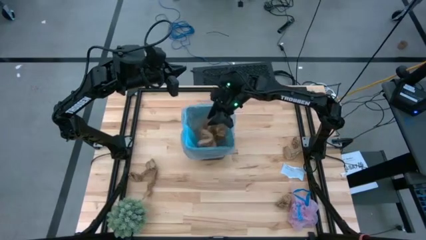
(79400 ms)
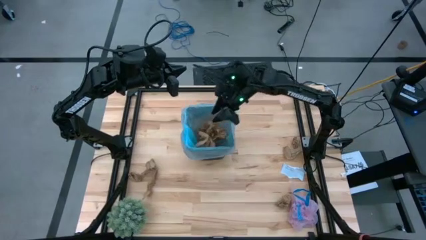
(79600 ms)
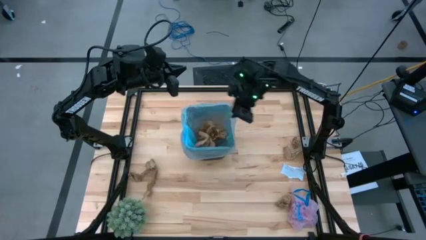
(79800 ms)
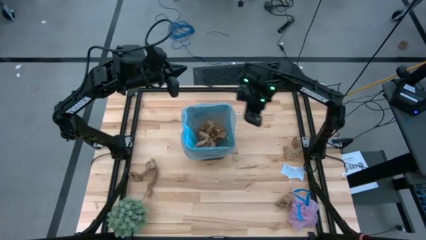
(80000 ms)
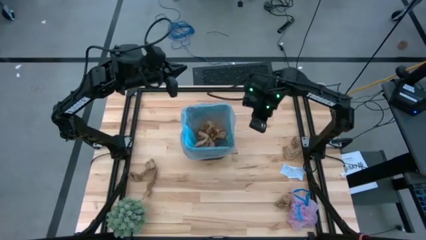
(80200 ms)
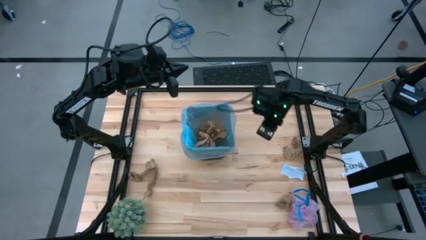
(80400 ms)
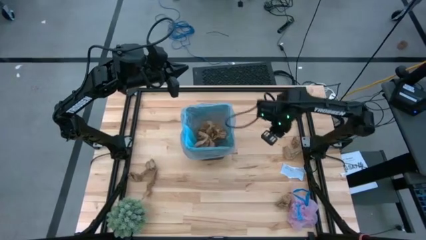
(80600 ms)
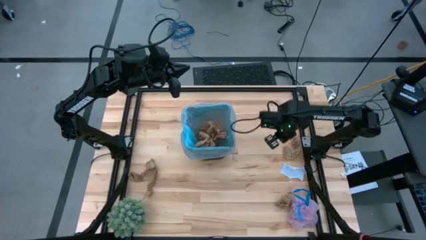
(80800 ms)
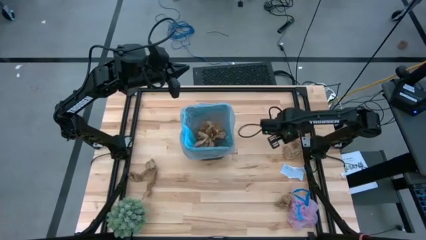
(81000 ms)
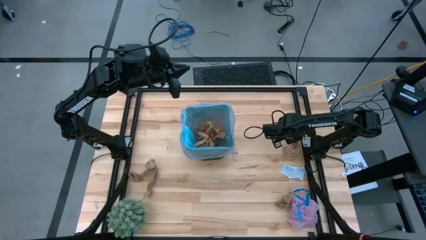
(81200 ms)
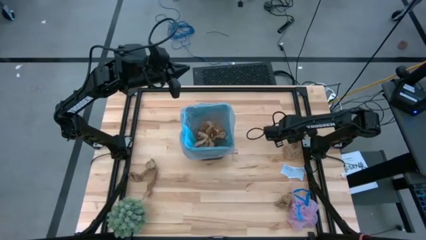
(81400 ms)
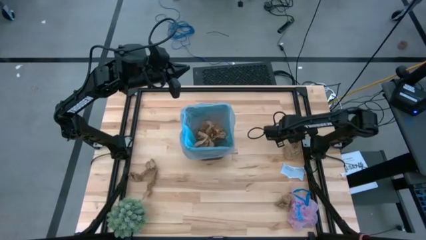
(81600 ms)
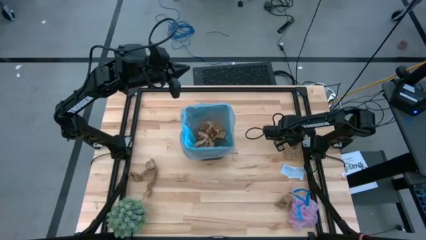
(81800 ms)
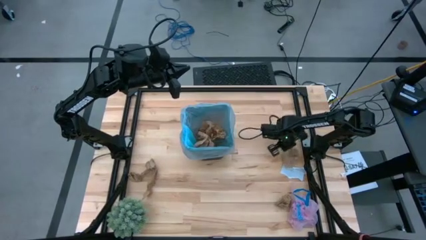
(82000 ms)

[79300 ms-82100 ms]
Task: Pick and place trash into bin
Put the brown paper into the brown trash bin

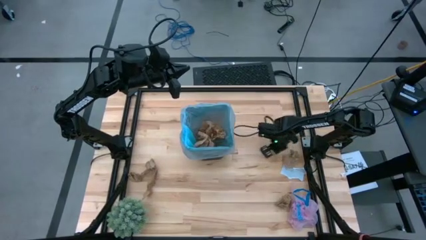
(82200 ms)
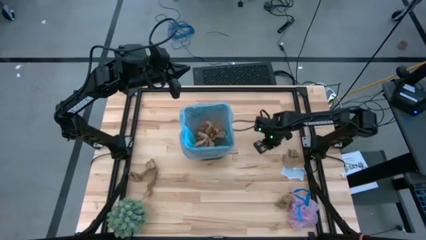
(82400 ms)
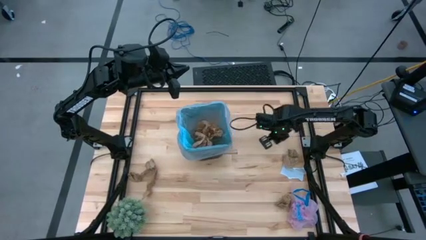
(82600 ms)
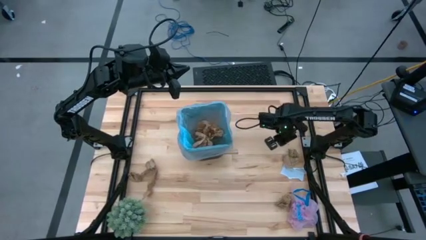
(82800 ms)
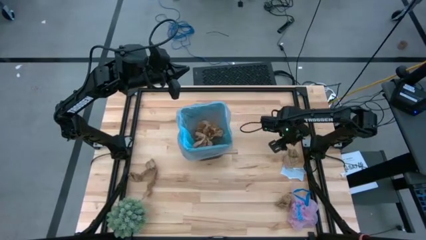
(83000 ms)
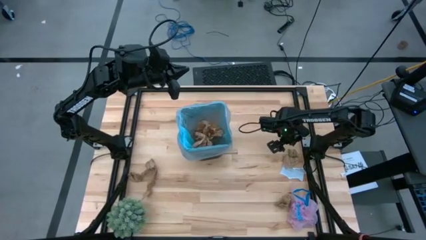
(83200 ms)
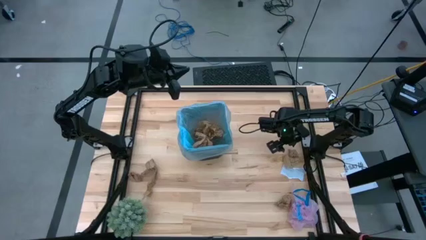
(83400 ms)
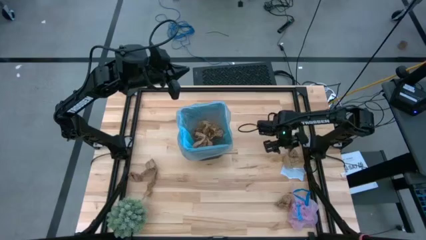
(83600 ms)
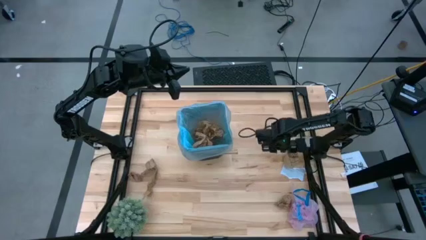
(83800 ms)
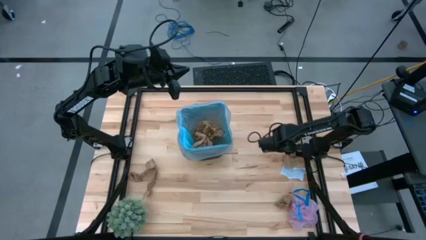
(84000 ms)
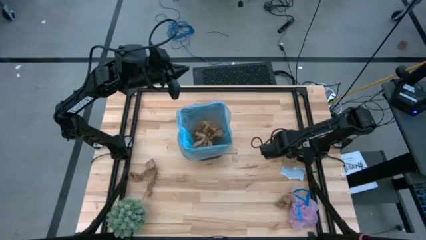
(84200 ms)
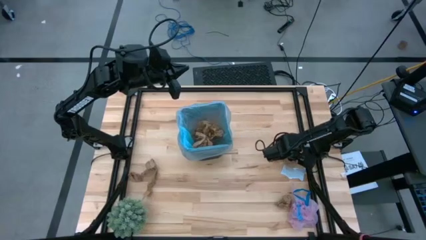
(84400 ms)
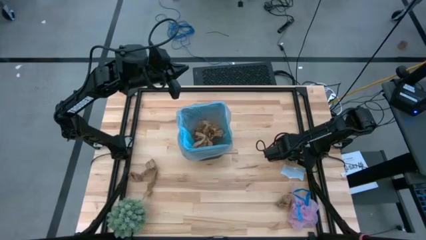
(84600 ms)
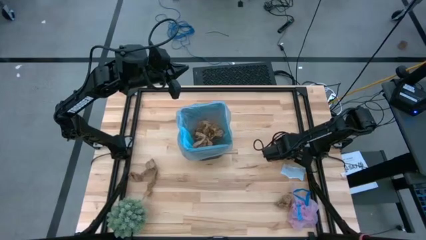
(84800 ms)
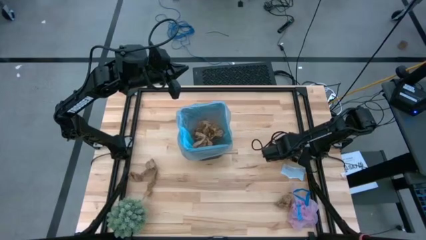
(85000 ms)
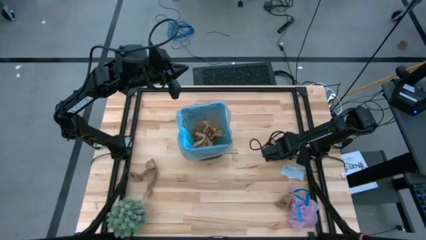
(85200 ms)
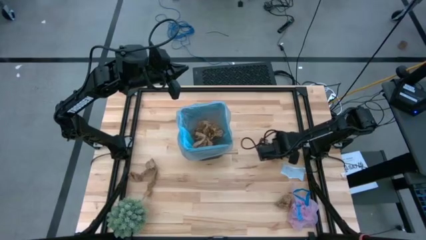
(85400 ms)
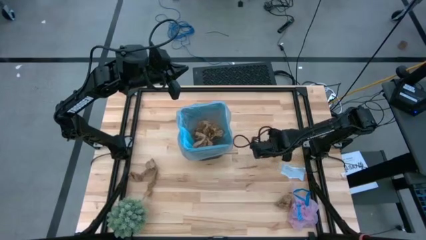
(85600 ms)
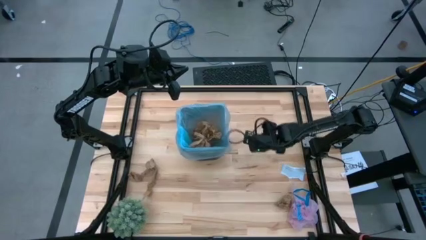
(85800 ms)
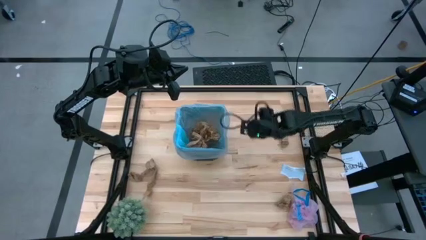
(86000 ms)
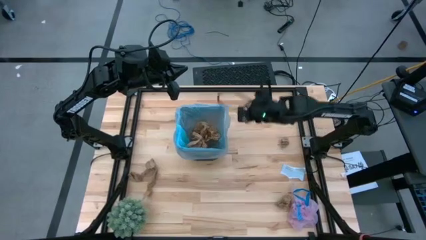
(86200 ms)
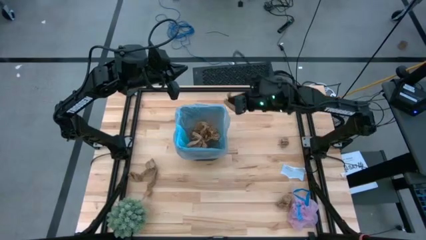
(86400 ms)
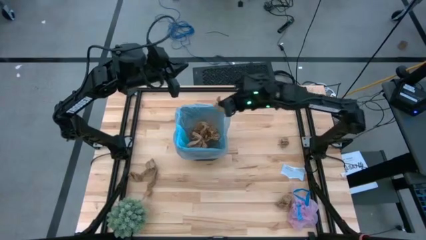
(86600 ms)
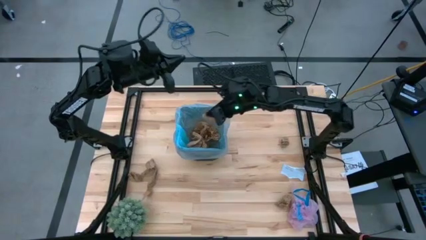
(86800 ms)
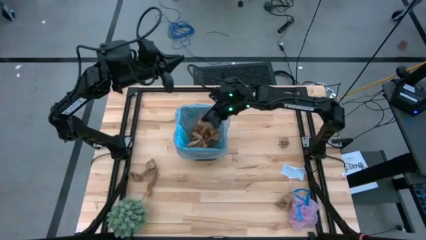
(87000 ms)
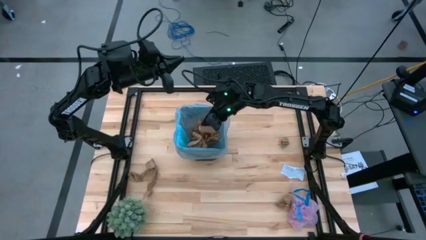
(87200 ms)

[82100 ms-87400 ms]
Put the brown paper into the brown trash bin

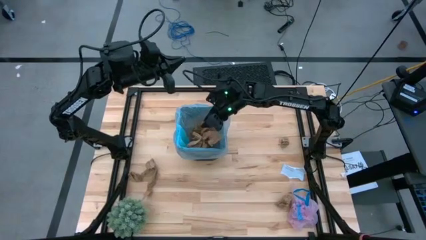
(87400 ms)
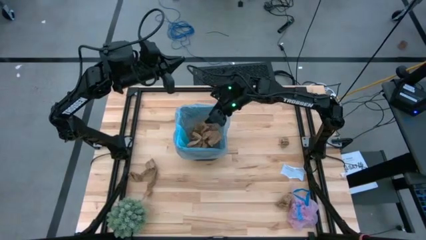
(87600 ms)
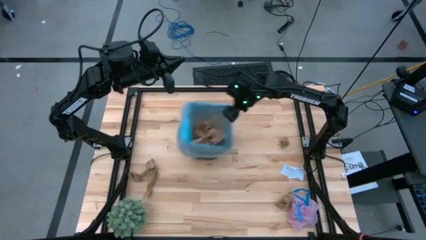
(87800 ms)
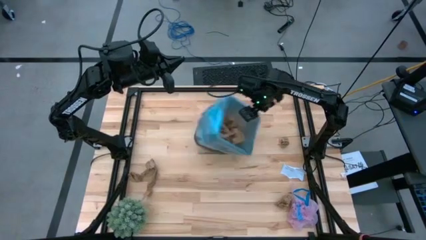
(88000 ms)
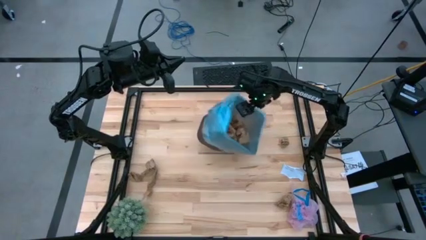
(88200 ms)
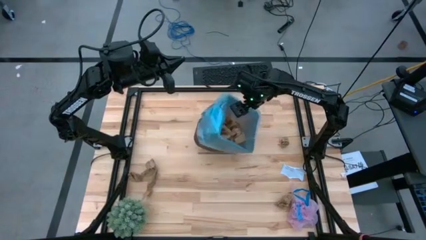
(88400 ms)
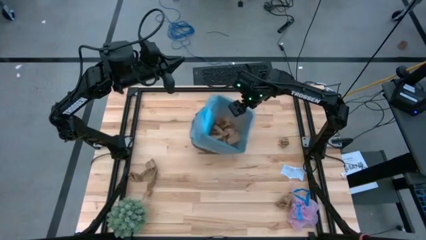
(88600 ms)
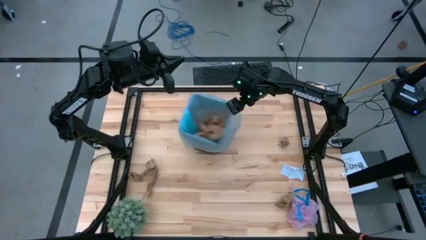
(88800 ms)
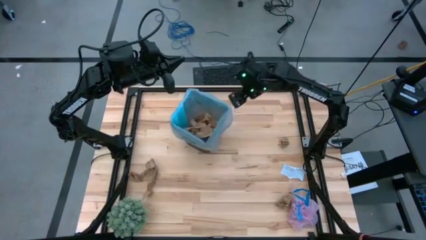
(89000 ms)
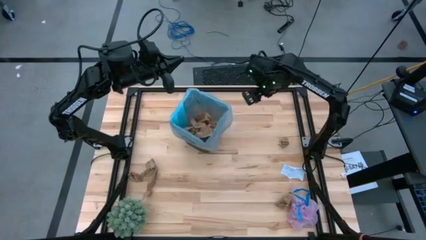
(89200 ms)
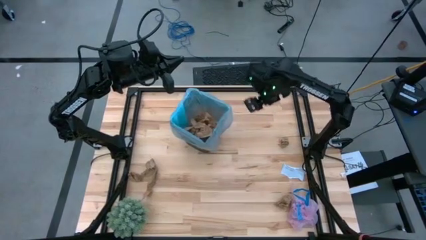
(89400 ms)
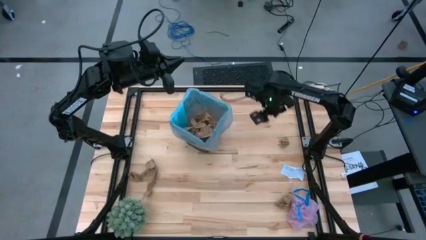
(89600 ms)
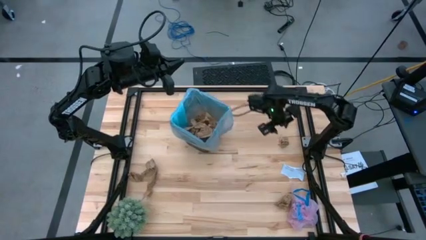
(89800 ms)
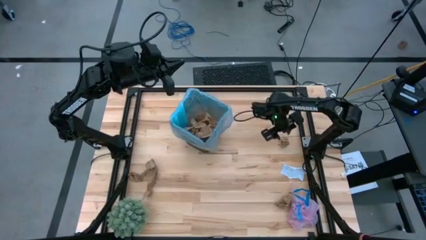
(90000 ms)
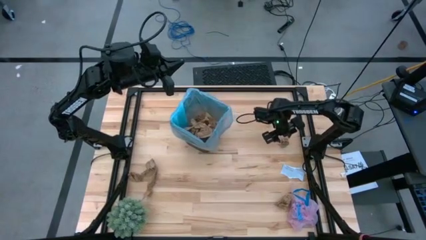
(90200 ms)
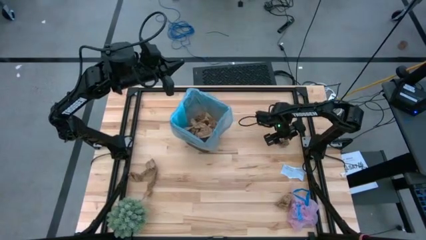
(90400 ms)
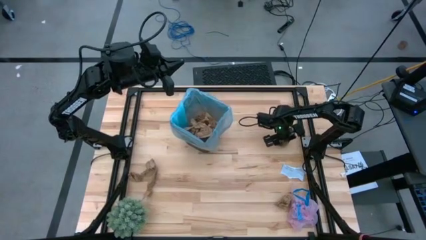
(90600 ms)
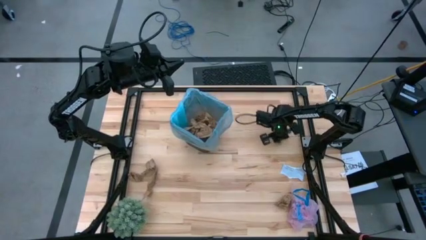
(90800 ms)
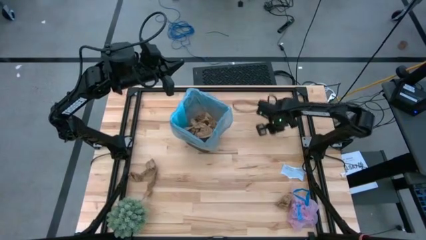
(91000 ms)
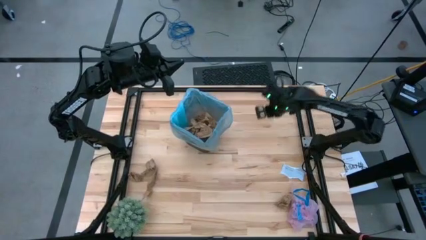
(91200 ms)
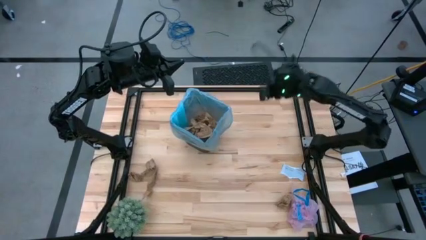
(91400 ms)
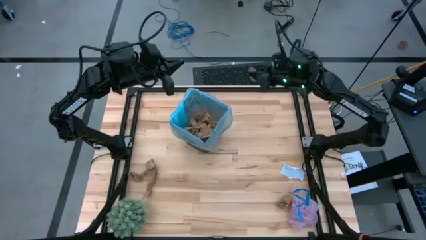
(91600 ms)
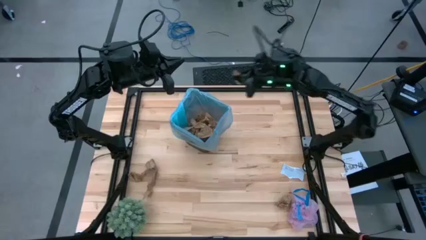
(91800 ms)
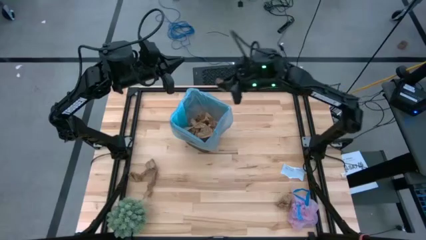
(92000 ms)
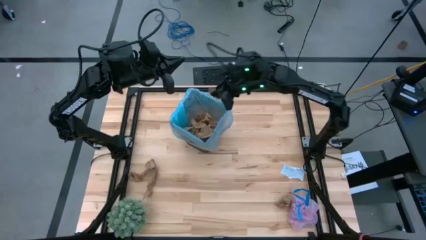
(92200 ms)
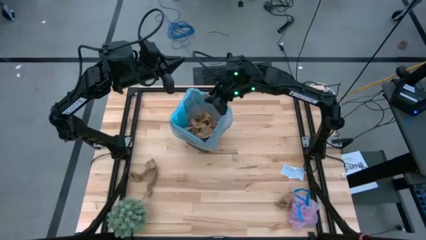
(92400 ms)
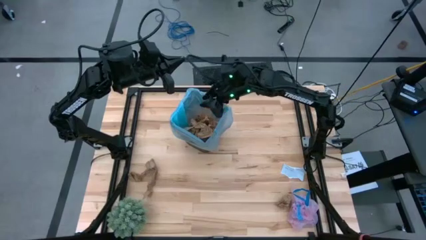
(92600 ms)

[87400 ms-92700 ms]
Put the brown paper into the brown trash bin

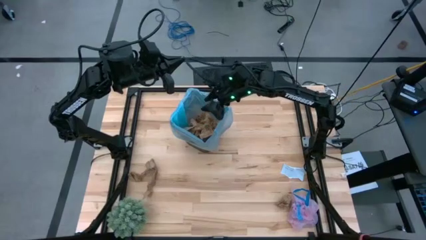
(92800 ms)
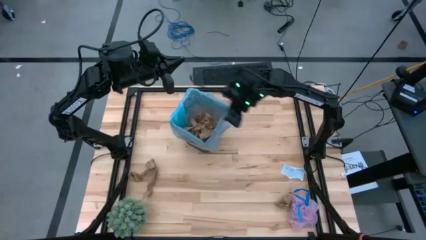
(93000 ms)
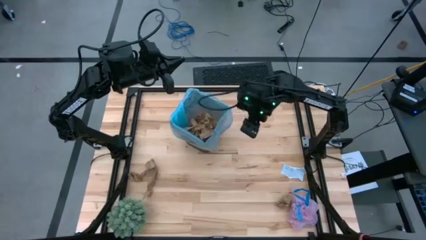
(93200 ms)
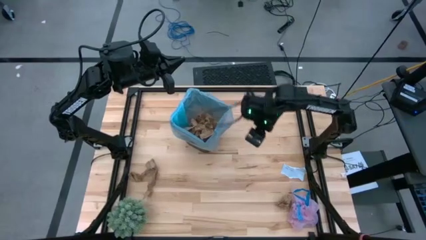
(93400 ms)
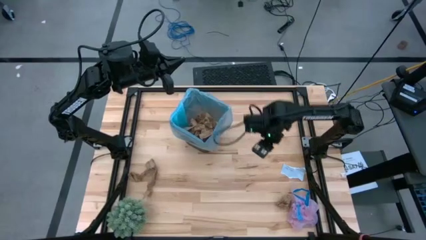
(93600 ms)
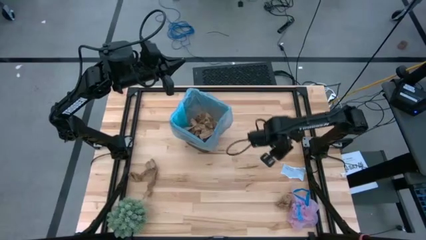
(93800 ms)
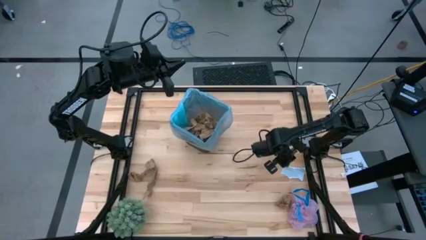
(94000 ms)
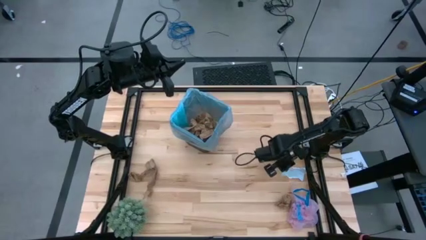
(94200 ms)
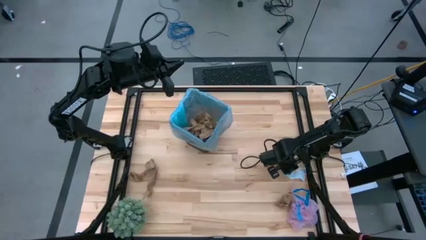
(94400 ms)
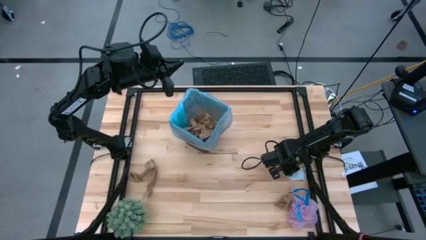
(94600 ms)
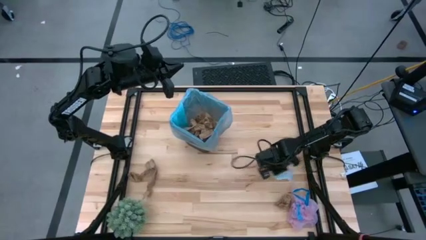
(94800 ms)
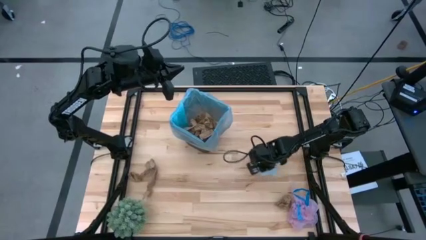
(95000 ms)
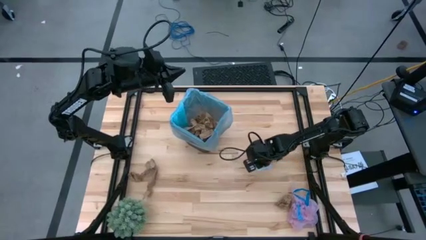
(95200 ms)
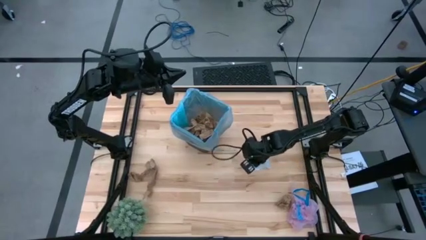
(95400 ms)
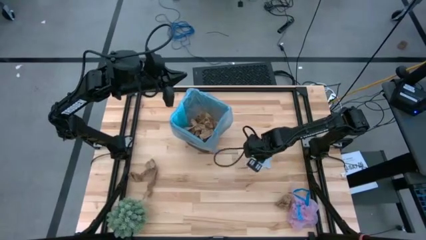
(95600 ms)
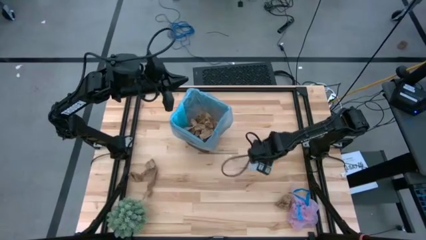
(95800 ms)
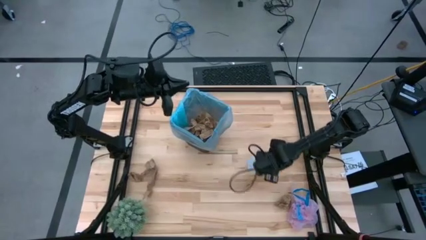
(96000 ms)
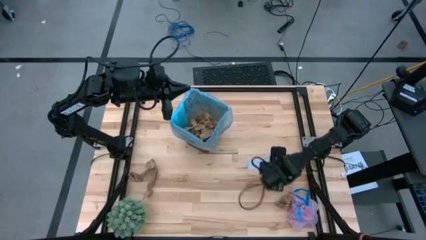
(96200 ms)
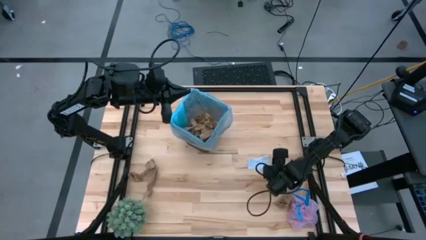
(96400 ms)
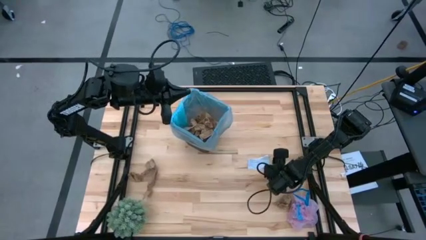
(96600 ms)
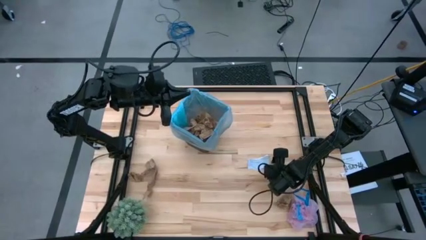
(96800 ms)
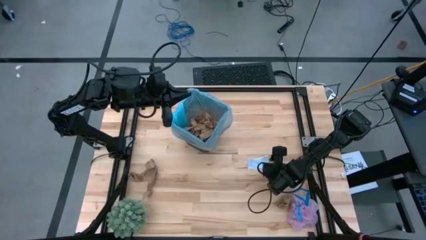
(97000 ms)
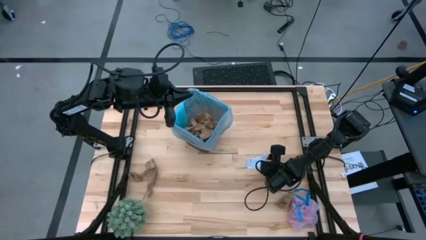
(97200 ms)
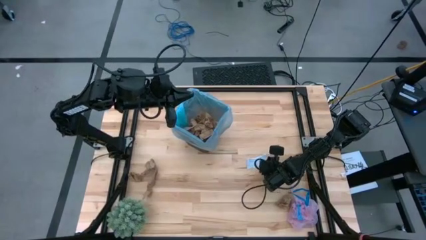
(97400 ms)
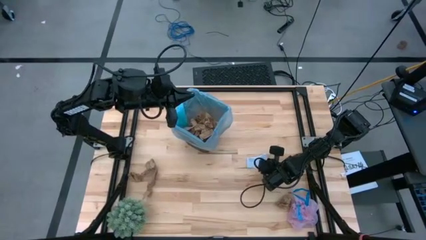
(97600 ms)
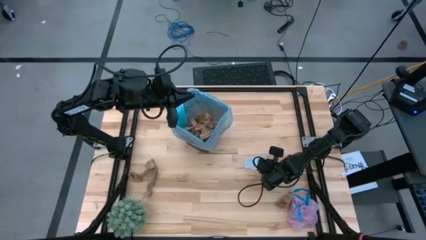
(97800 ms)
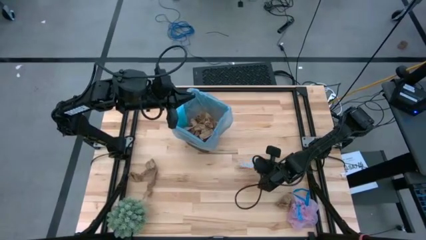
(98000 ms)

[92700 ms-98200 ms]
Put the gray paper into the brown trash bin
